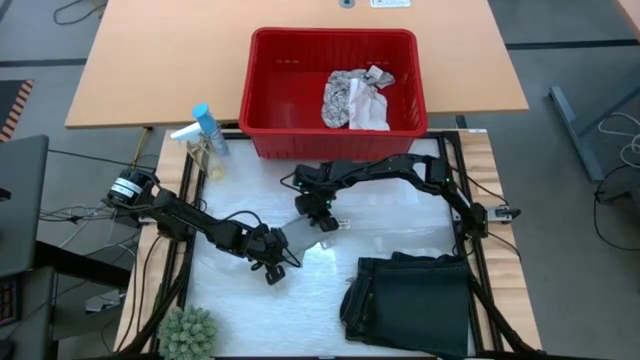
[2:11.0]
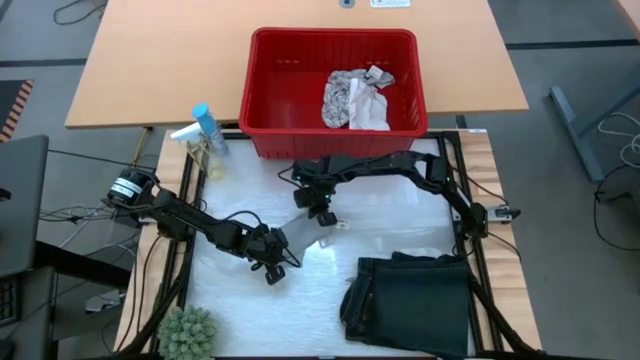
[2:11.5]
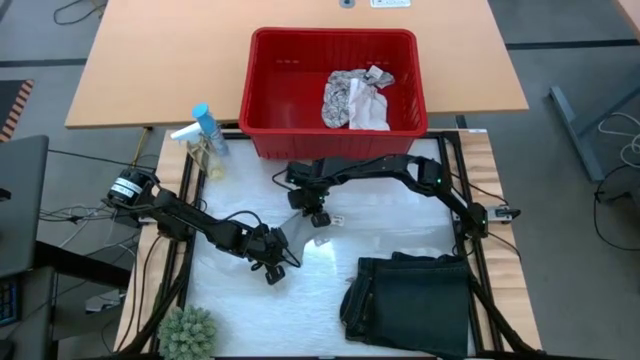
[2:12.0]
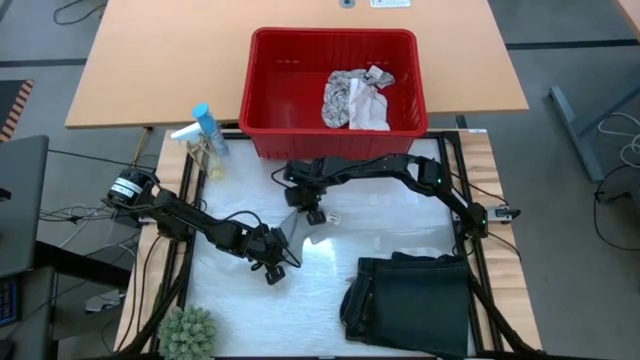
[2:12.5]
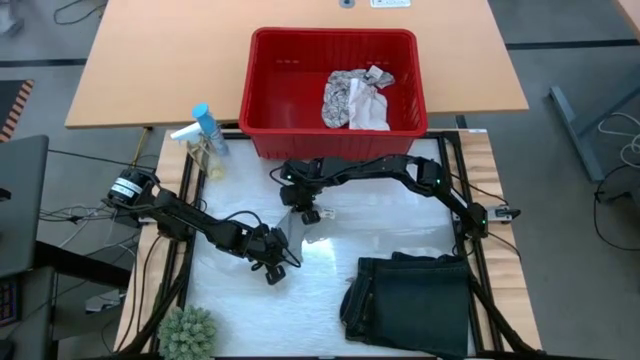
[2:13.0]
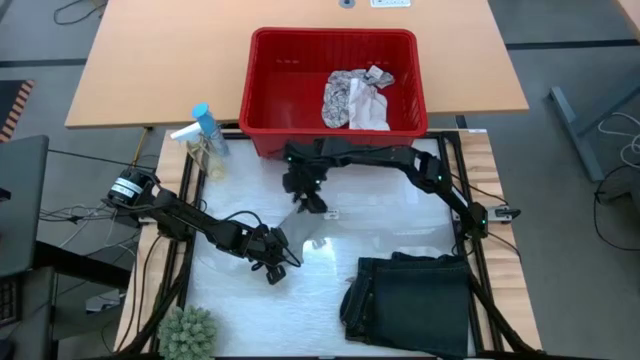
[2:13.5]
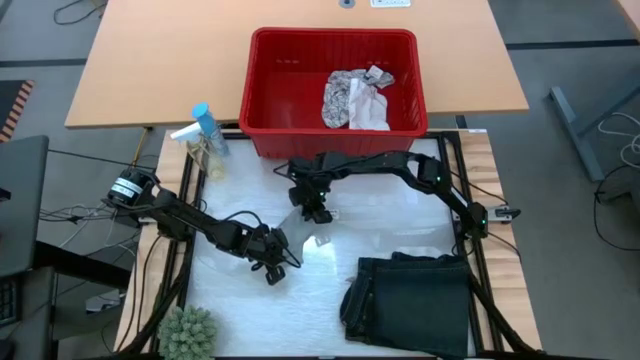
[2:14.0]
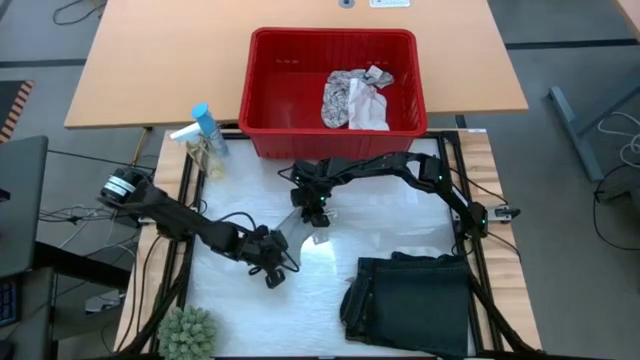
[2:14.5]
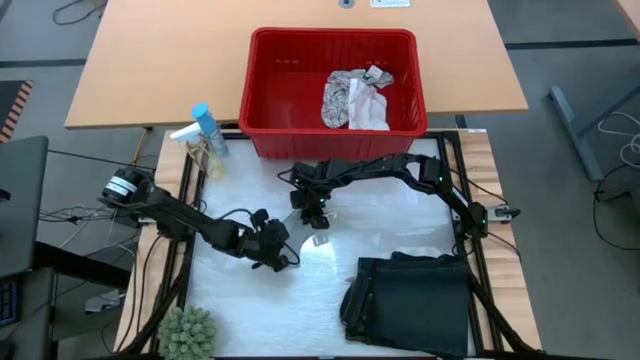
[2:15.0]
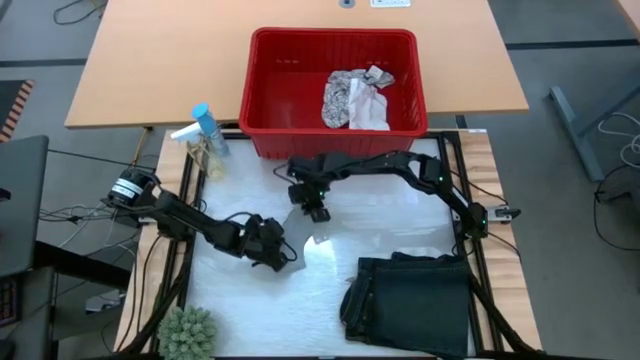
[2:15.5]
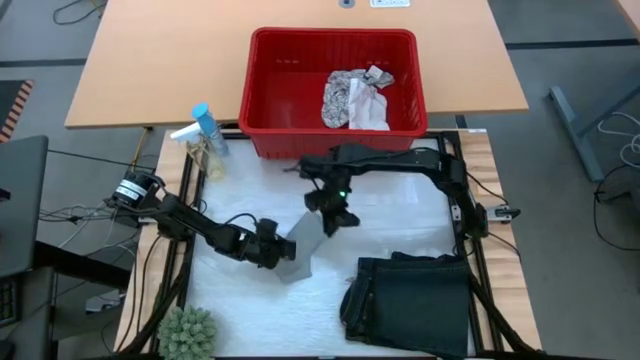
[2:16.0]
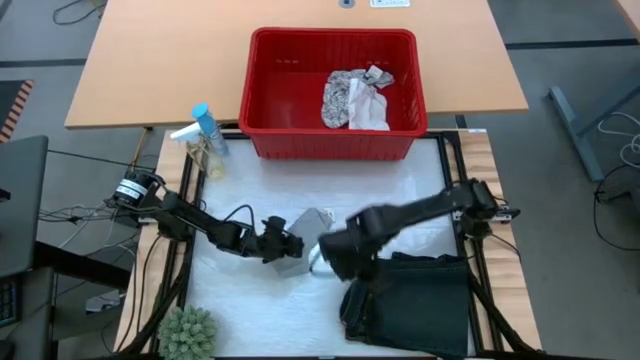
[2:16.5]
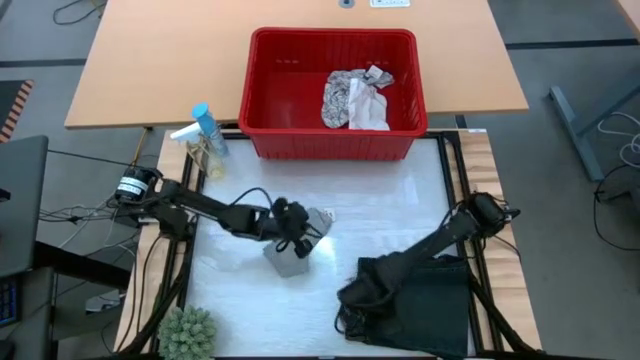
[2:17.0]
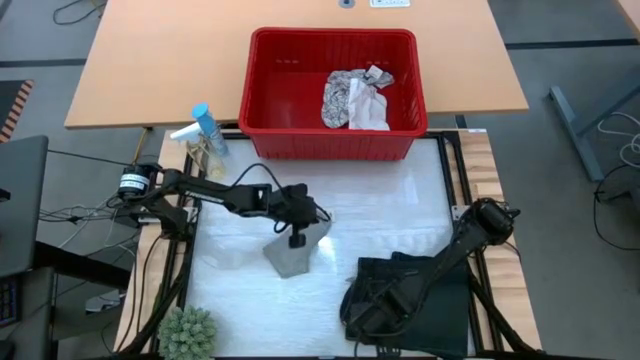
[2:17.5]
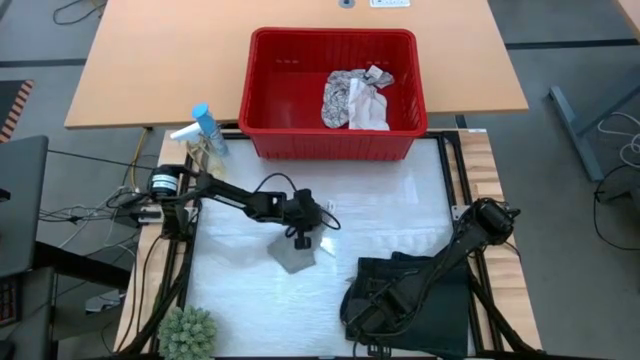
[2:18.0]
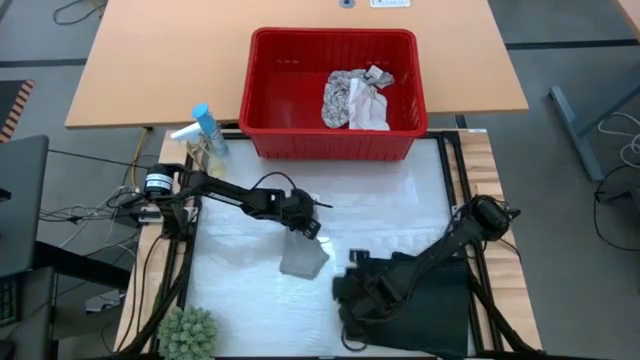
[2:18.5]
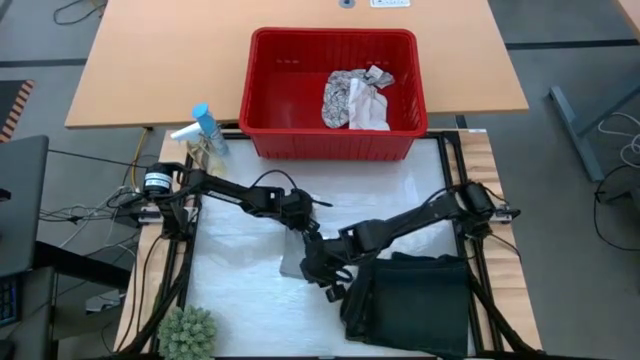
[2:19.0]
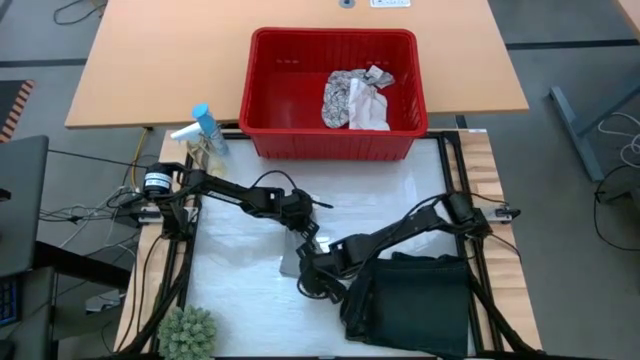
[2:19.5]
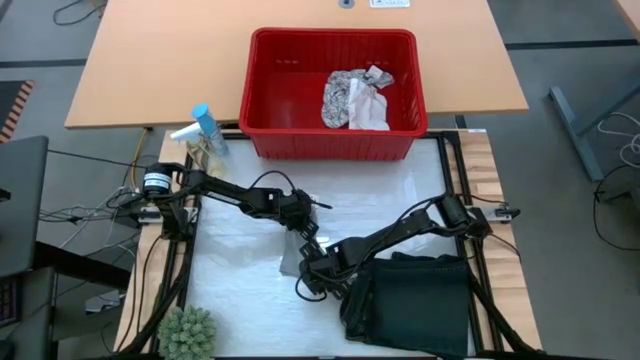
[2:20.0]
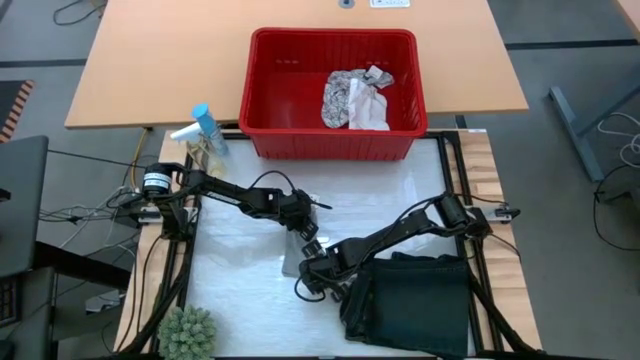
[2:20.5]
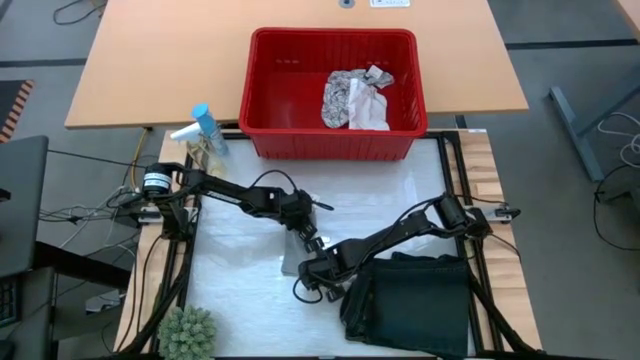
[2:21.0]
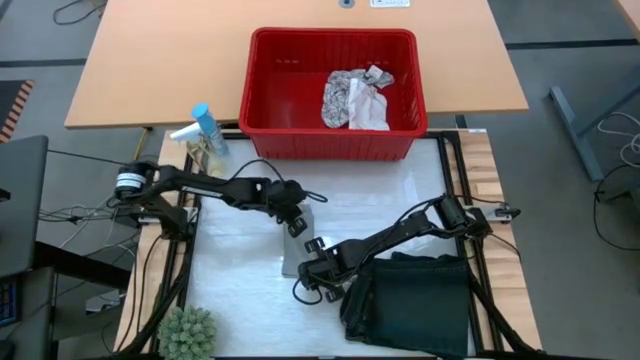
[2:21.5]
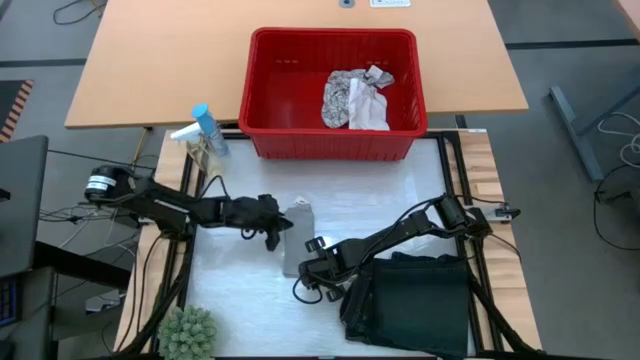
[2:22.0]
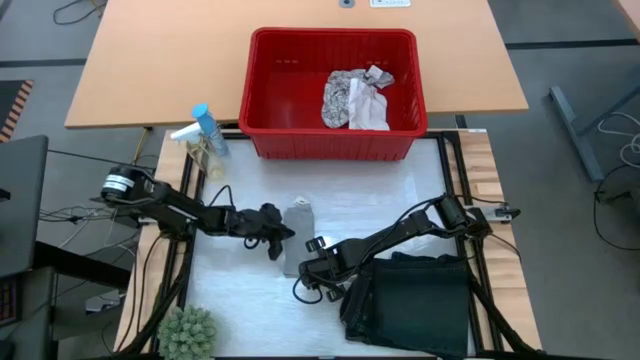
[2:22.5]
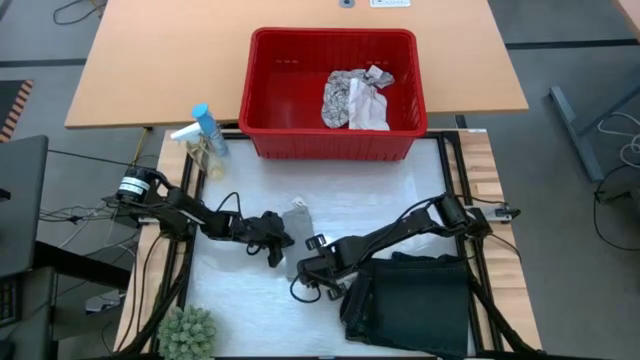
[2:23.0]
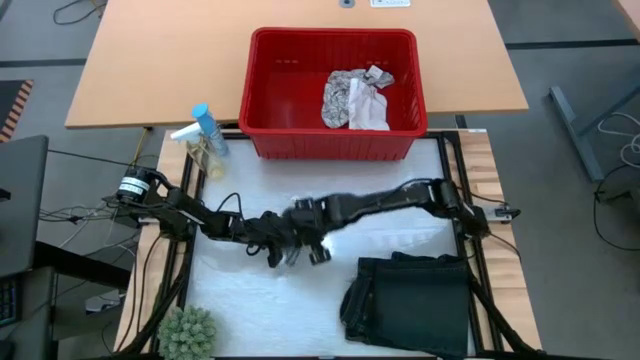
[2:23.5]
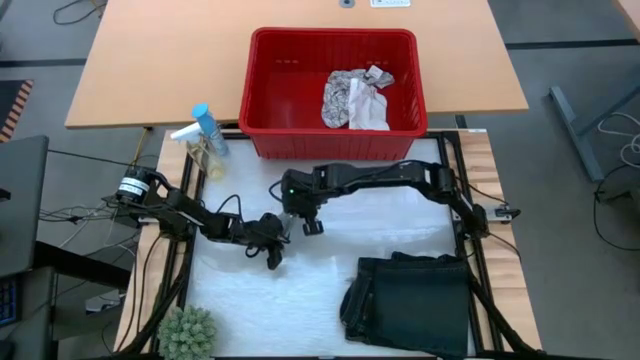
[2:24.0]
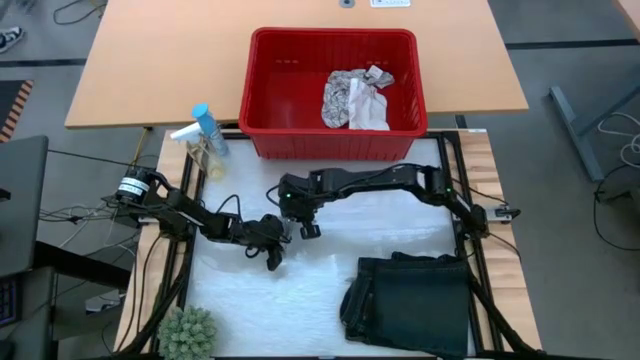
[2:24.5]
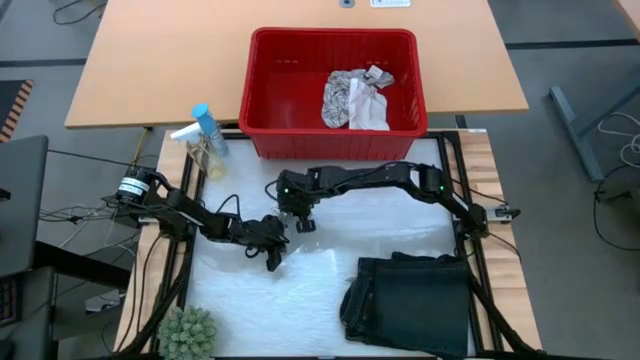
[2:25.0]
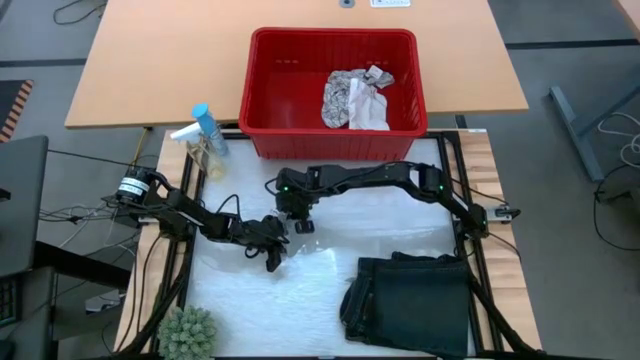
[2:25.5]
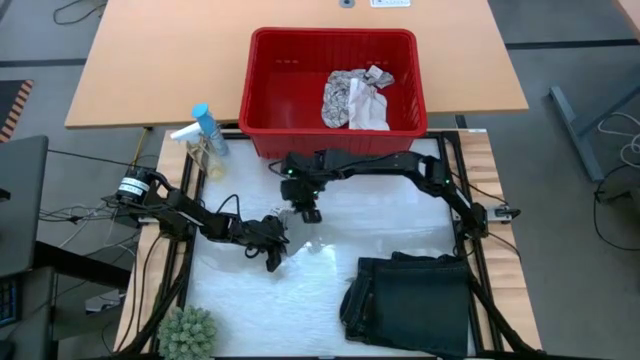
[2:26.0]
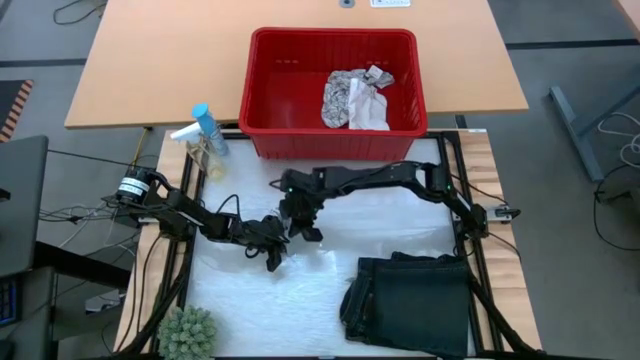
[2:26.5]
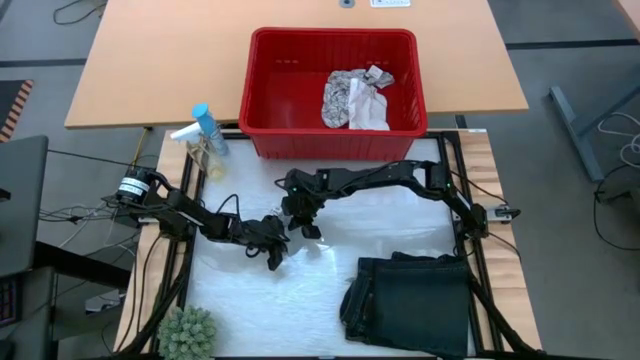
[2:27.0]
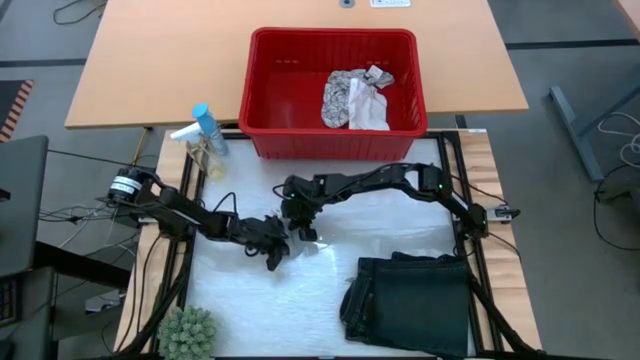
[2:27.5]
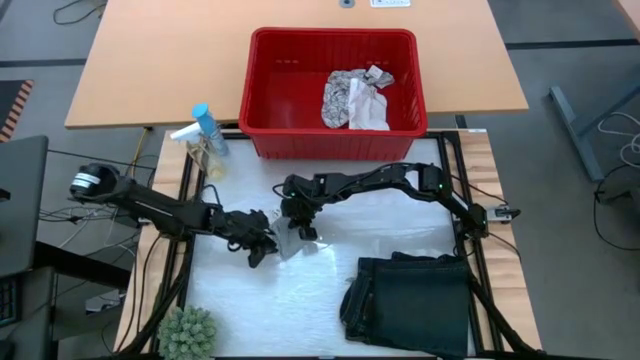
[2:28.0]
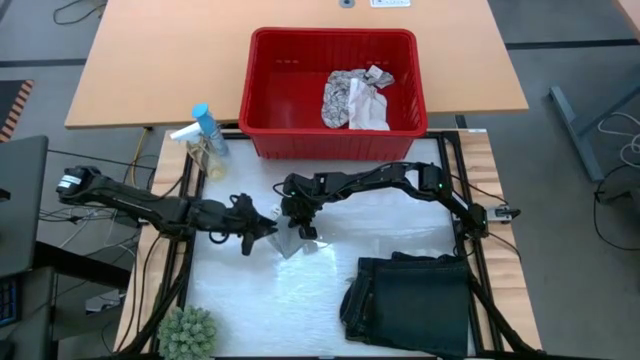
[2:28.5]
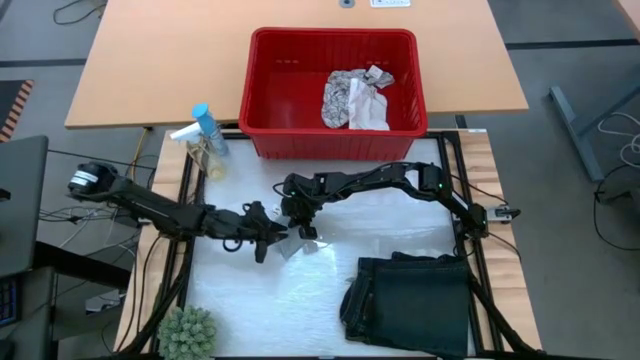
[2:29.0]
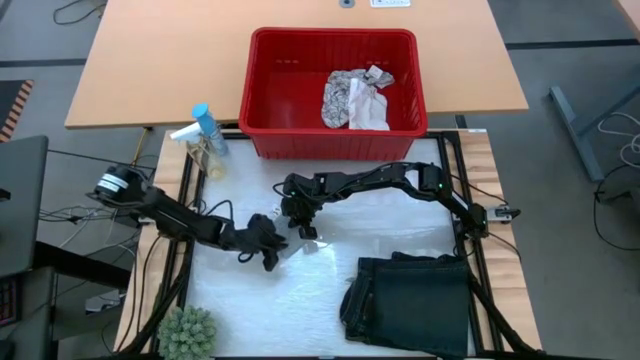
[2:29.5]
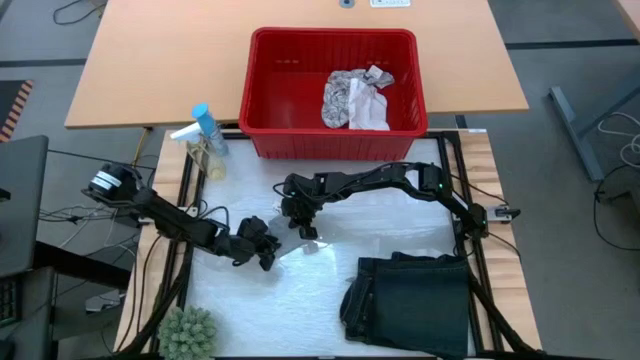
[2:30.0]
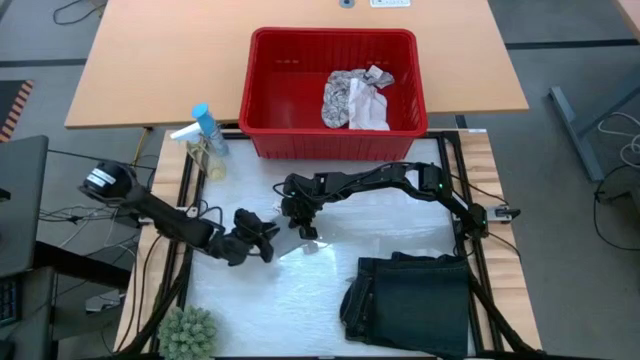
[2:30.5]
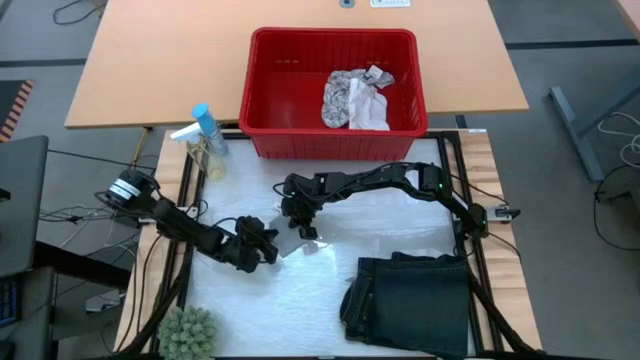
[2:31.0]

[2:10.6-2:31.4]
Task: Fold Laundry from Bin
Fold the gray boxer from the red laundry bin

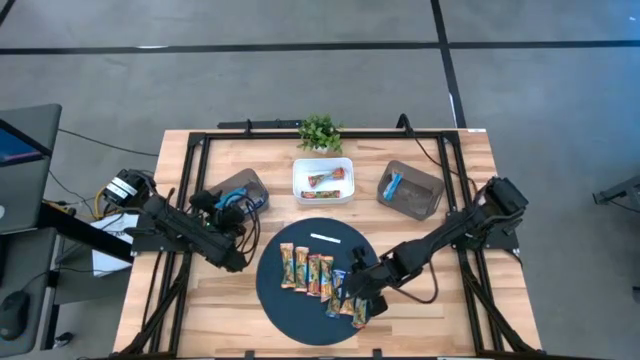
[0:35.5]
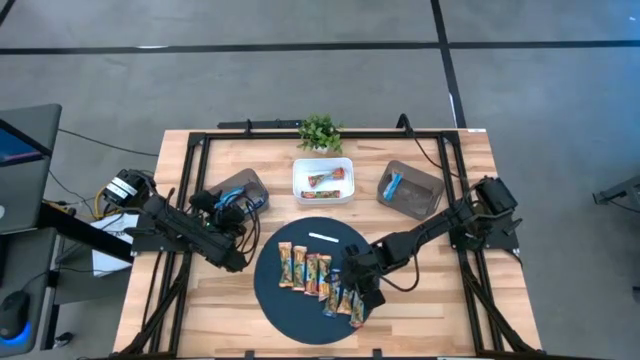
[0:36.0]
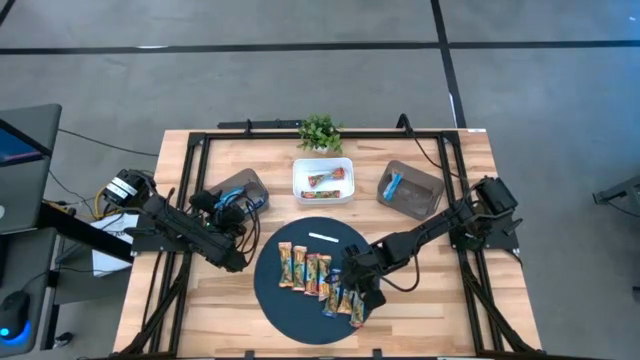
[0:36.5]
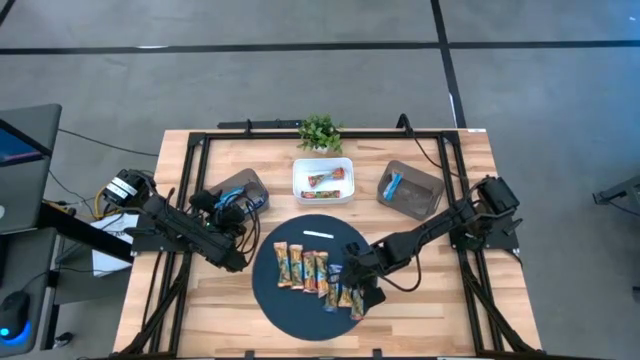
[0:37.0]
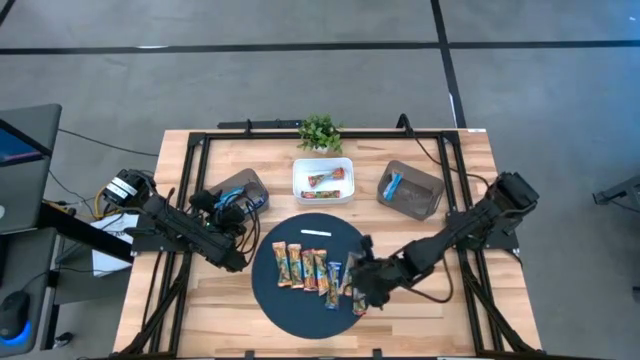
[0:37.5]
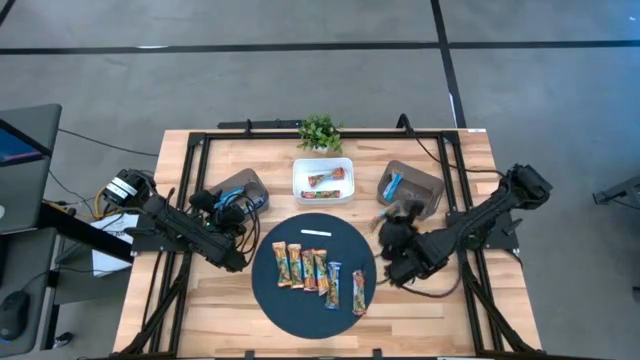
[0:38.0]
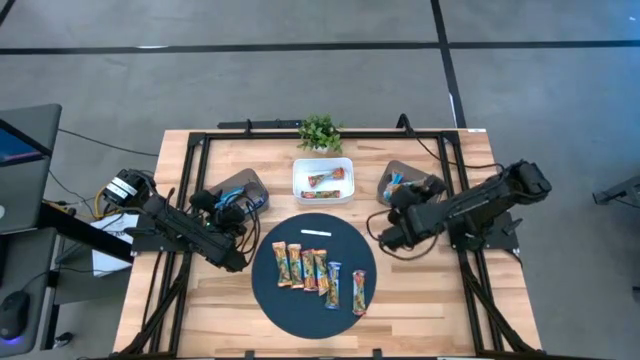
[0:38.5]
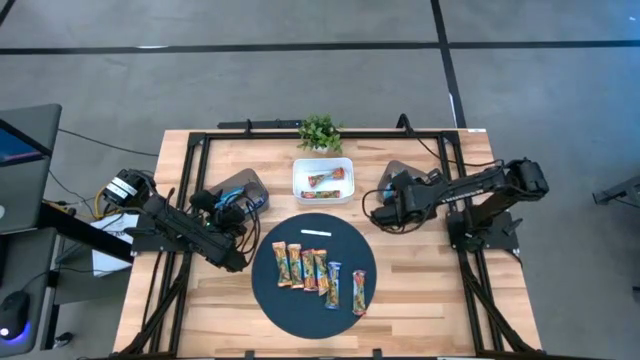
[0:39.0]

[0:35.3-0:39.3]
Task: Pick and place Granola Bars by type
Put the yellow granola bar into the right black bin
